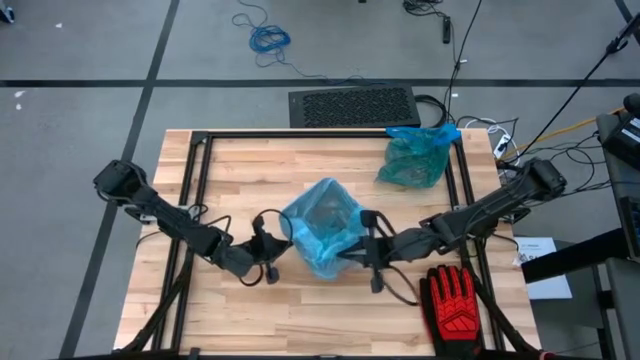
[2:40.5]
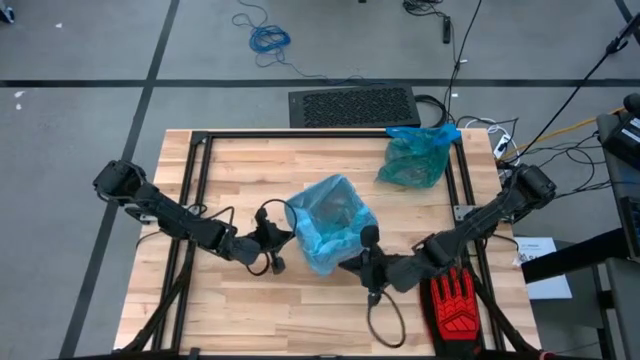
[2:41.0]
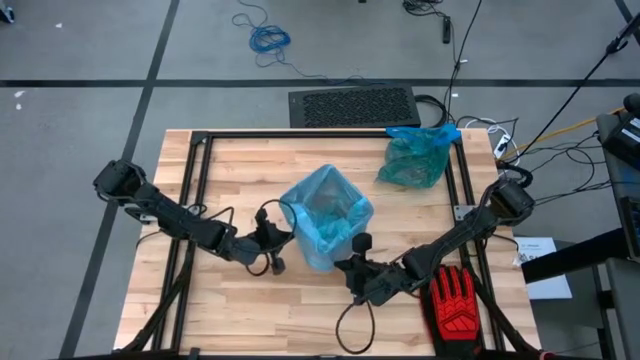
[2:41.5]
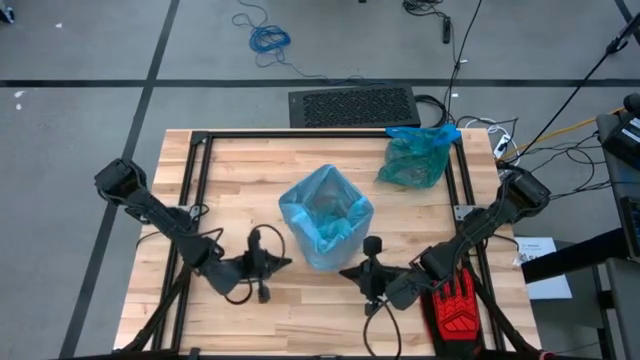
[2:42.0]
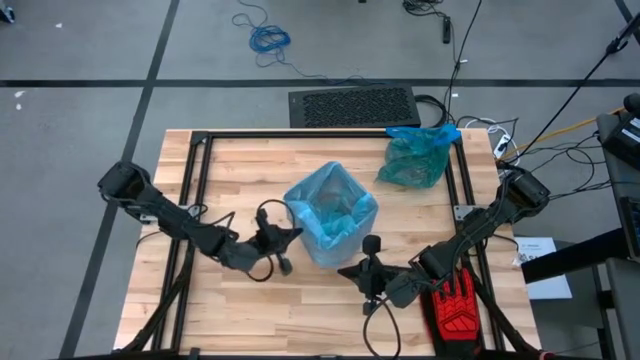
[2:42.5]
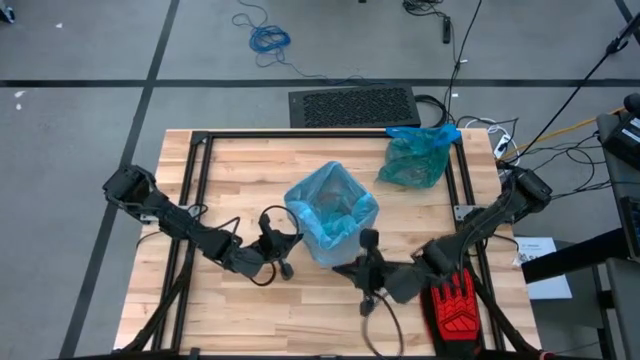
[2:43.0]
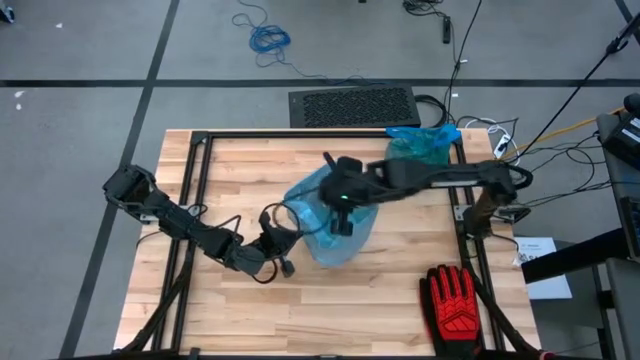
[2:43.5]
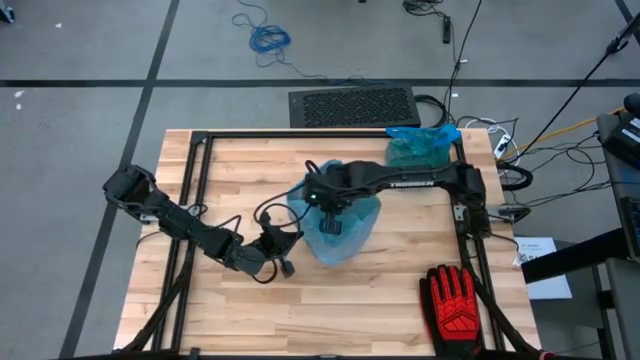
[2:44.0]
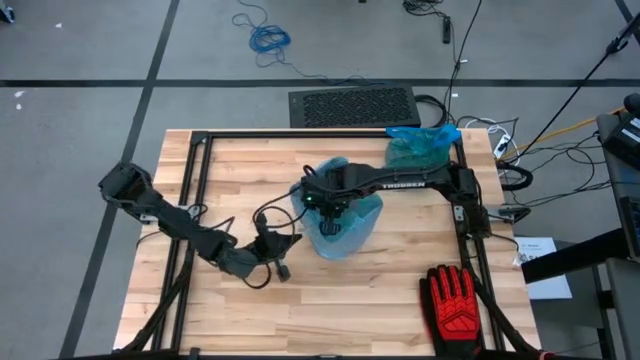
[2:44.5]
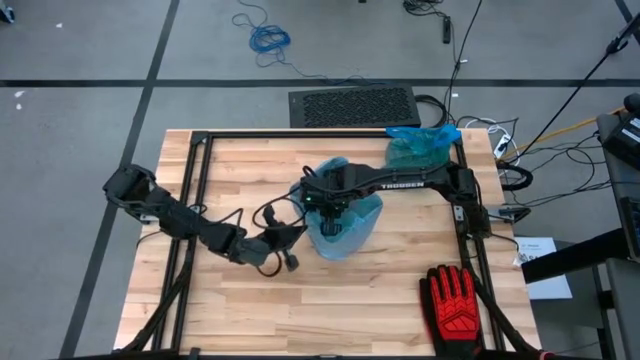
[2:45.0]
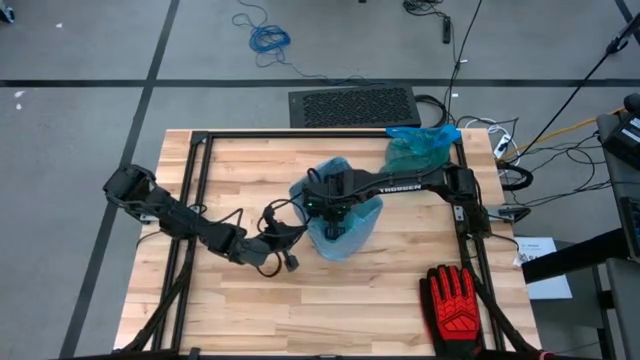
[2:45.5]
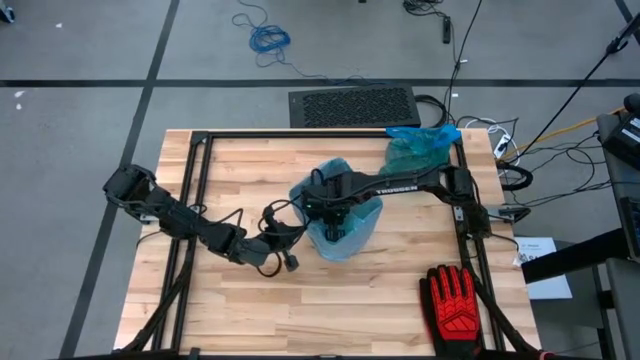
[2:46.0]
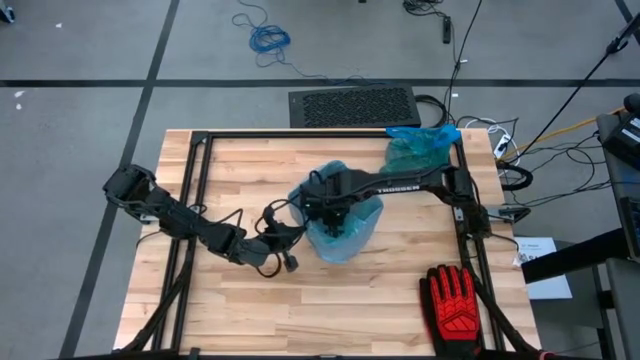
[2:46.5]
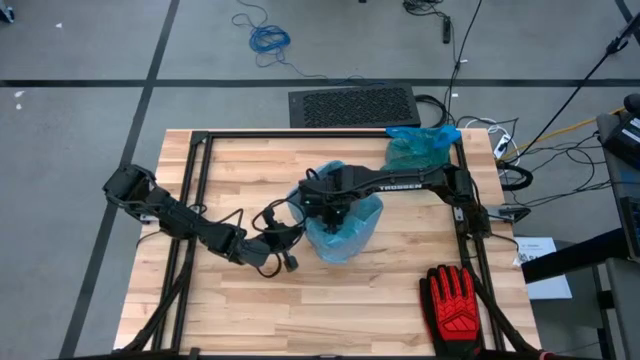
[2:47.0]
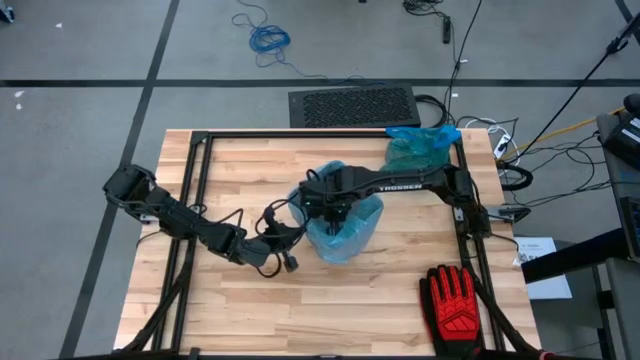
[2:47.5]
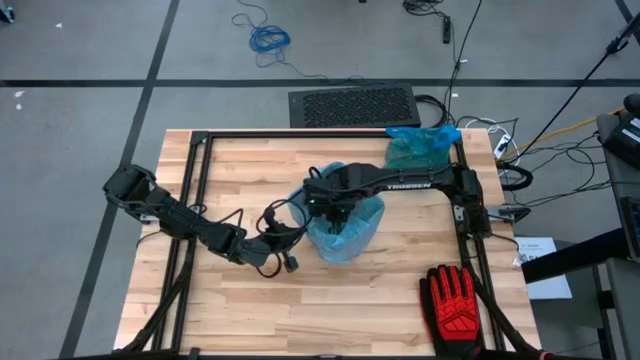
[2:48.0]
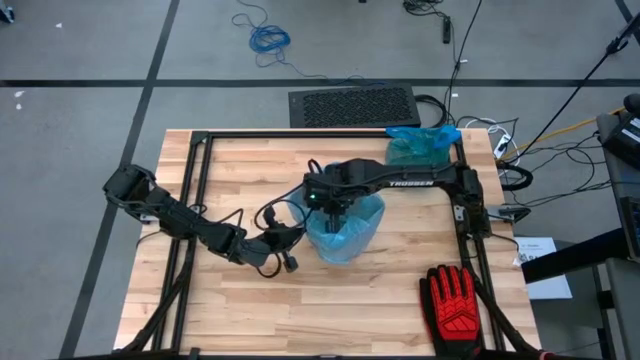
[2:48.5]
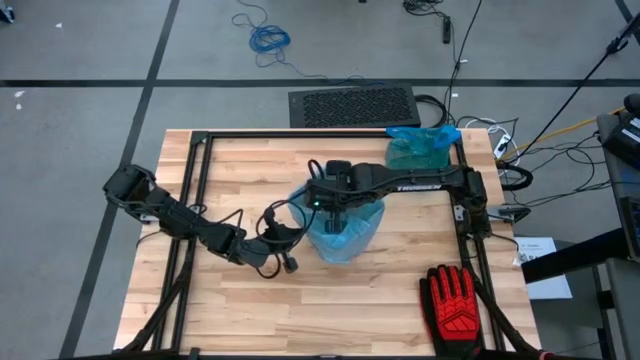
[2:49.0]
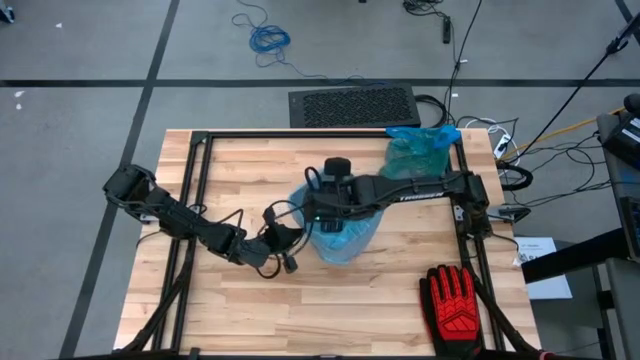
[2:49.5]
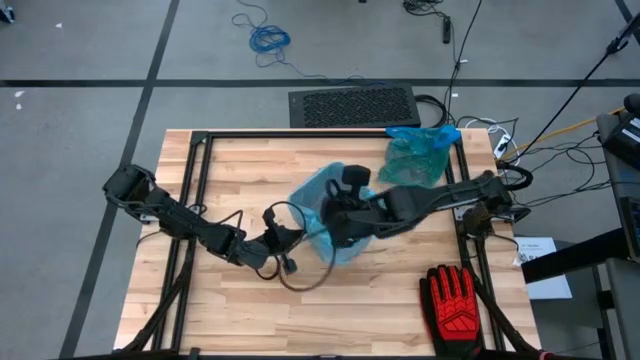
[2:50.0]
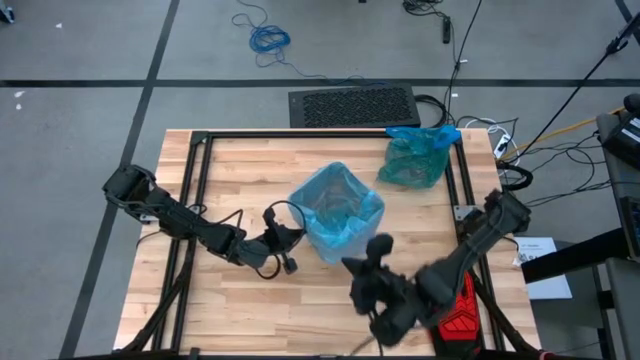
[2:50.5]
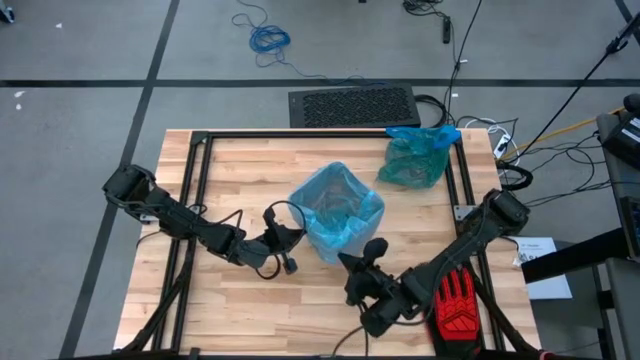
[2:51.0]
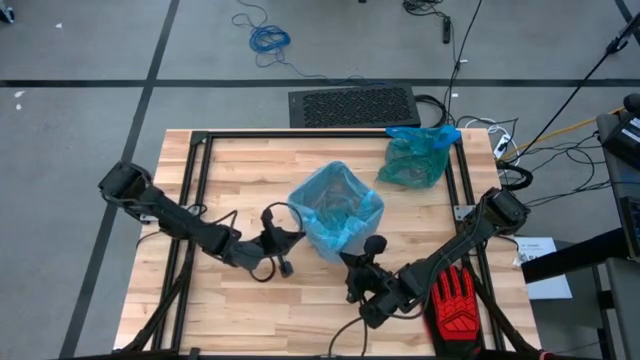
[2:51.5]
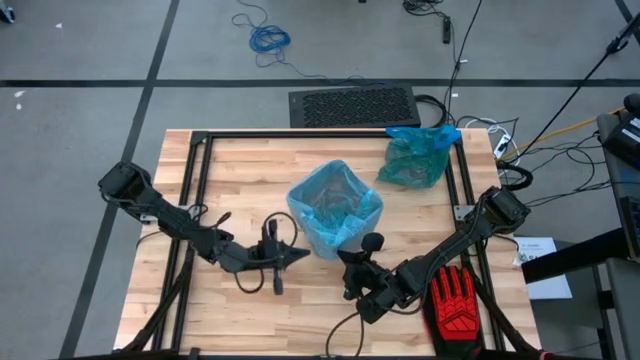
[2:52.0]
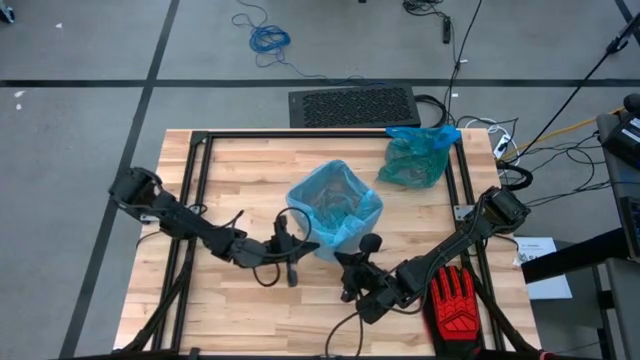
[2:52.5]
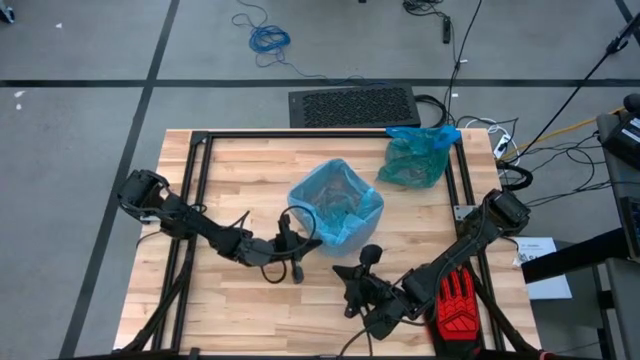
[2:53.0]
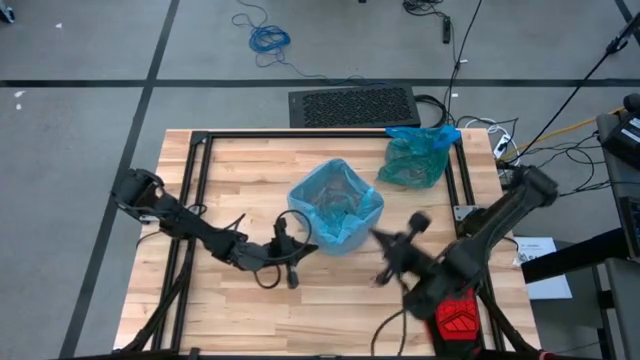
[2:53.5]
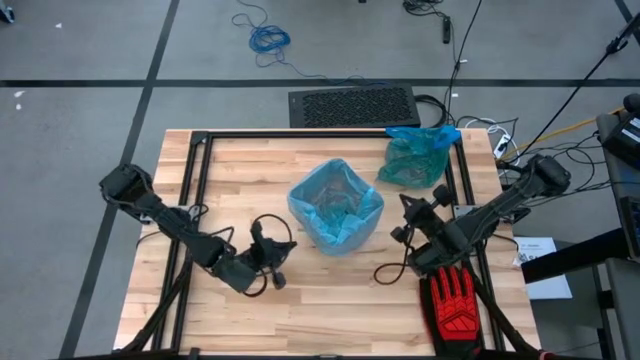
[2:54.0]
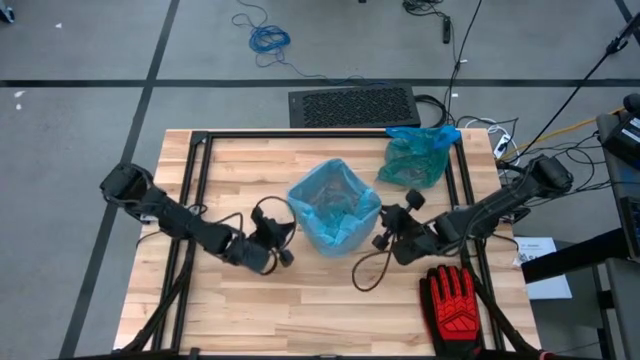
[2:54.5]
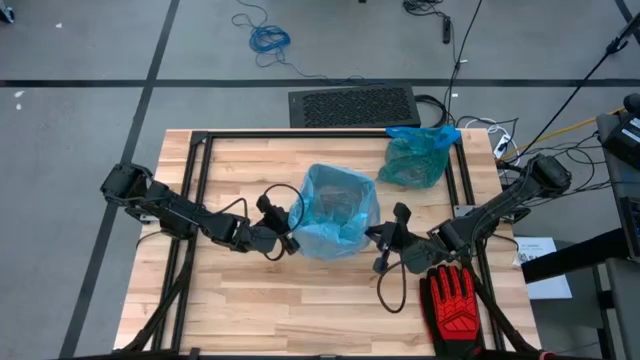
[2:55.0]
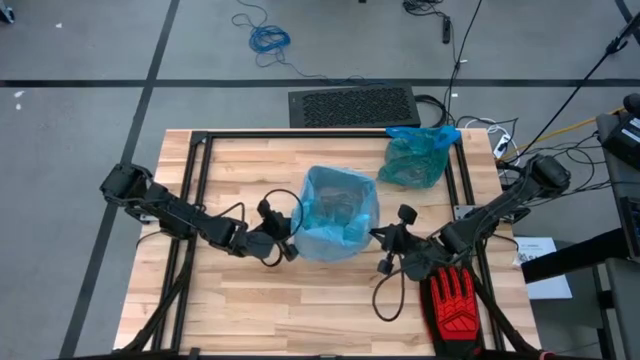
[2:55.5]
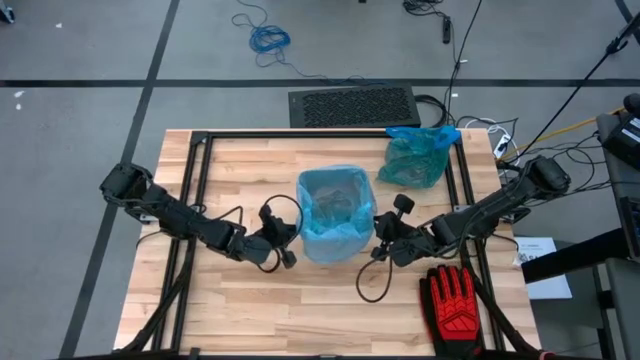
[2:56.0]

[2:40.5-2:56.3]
Task: place trash/remove bag and relplace
Insert the blue trash bag into the black trash bin

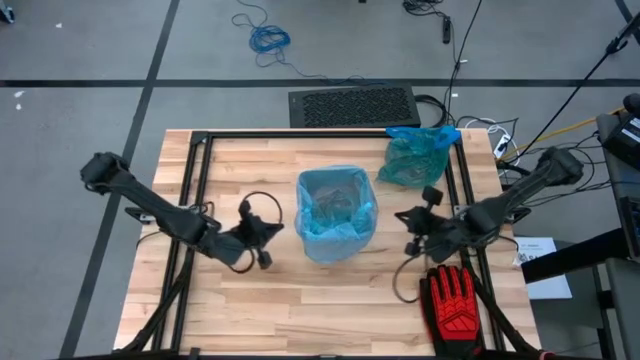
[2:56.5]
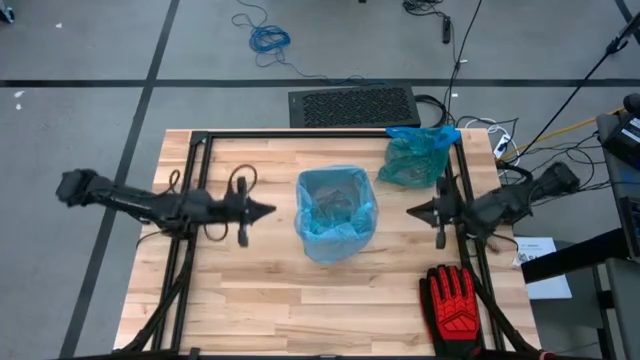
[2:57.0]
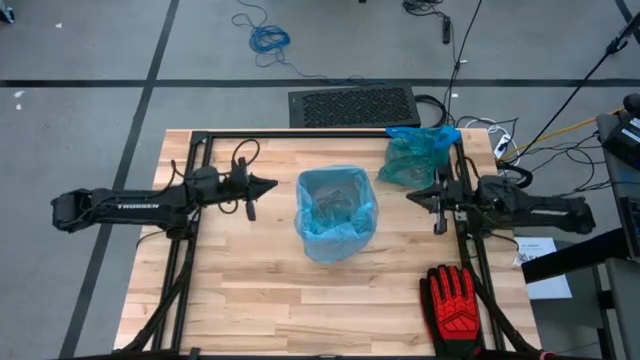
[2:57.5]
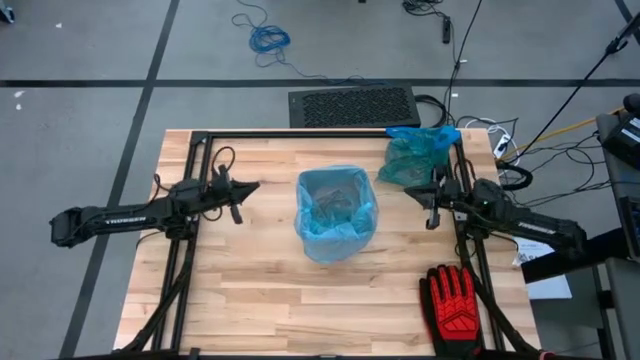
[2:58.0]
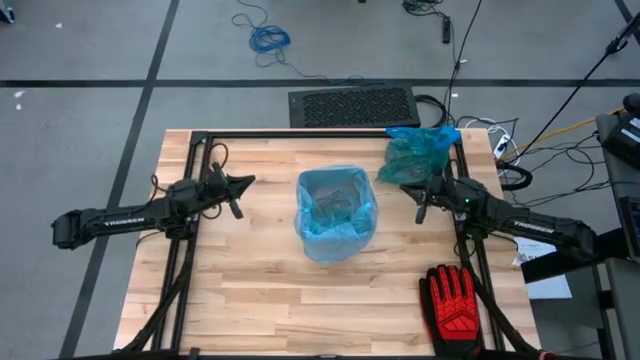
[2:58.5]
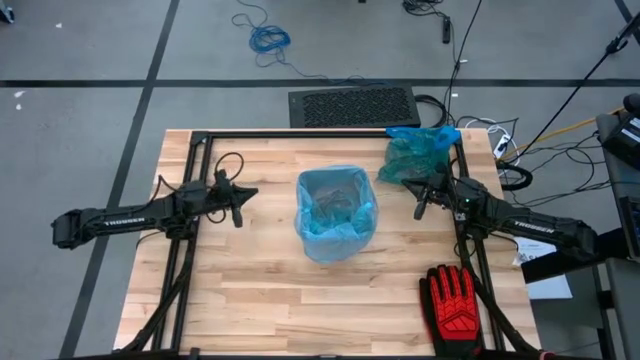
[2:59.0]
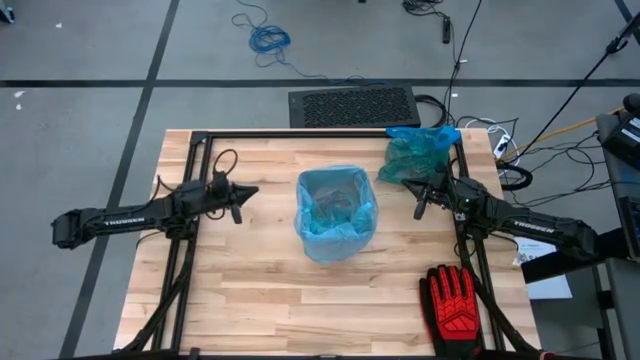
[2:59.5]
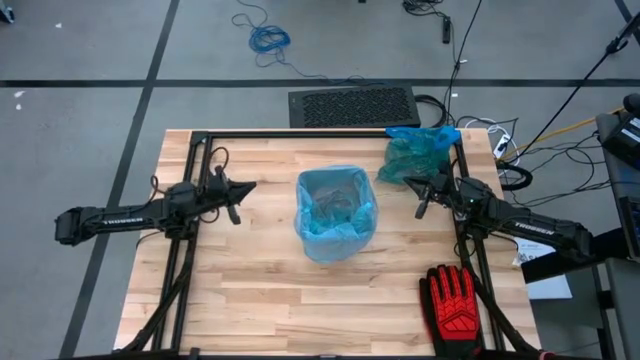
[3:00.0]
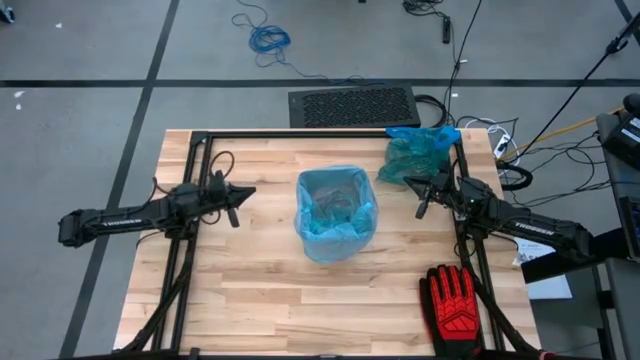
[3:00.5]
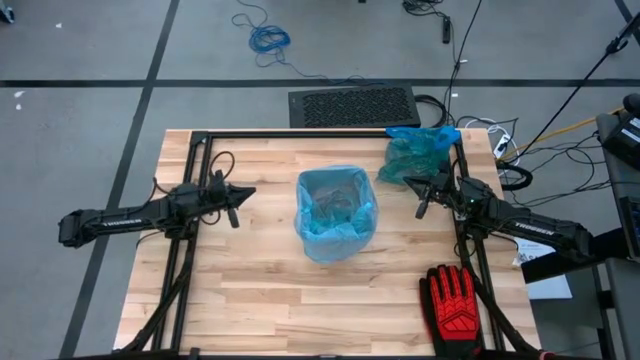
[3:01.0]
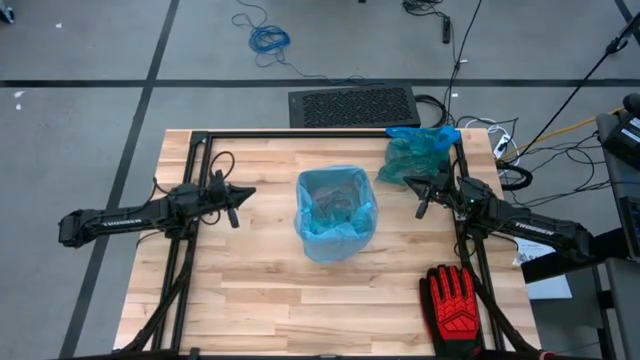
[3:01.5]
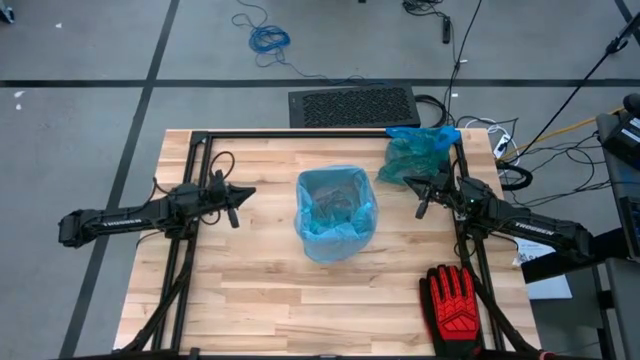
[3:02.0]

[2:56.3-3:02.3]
Return to Home Position
